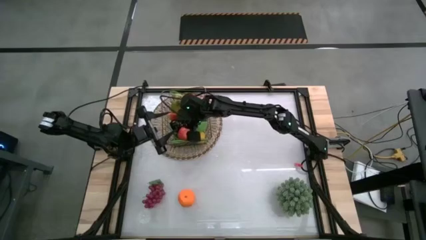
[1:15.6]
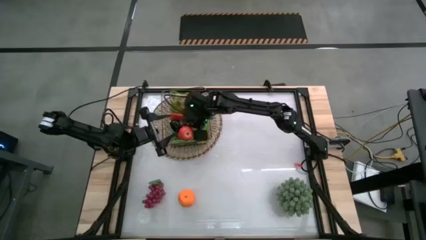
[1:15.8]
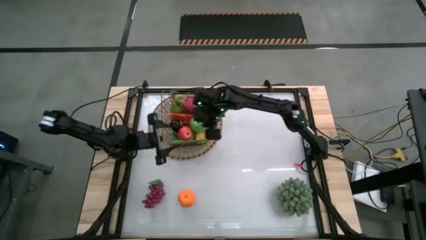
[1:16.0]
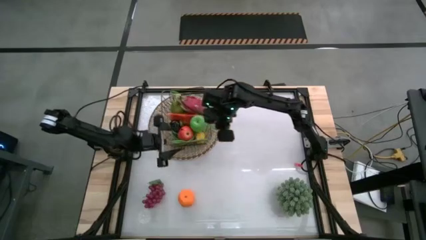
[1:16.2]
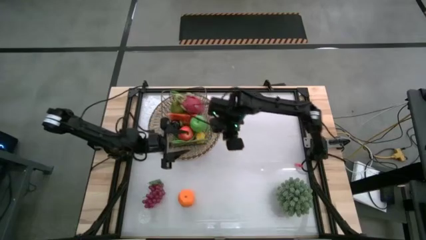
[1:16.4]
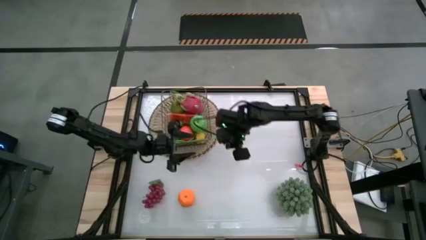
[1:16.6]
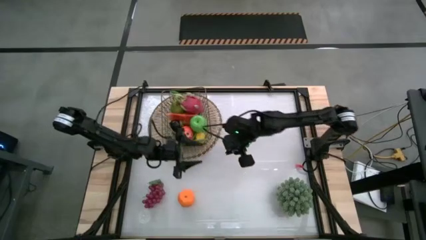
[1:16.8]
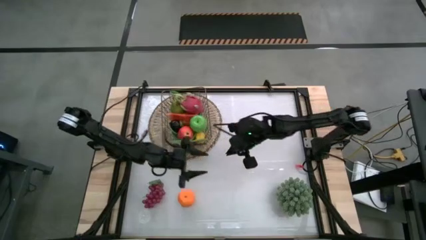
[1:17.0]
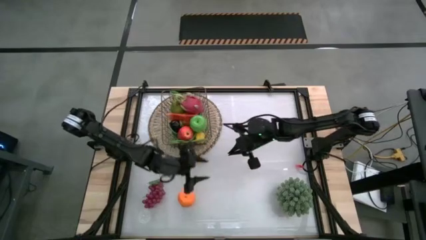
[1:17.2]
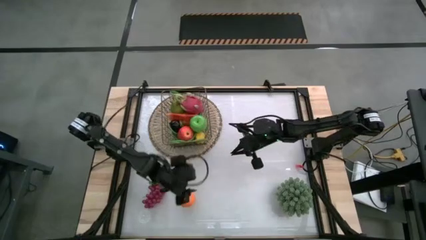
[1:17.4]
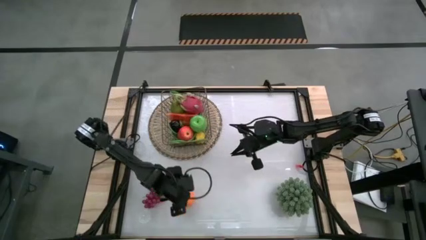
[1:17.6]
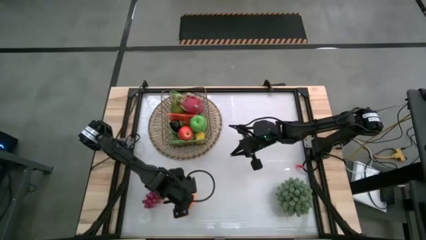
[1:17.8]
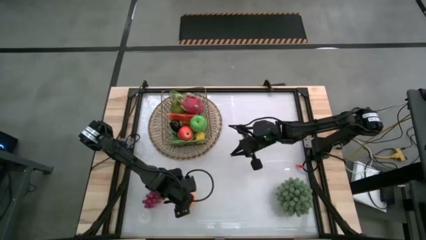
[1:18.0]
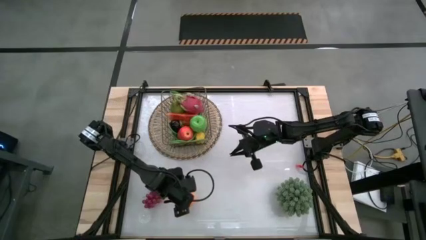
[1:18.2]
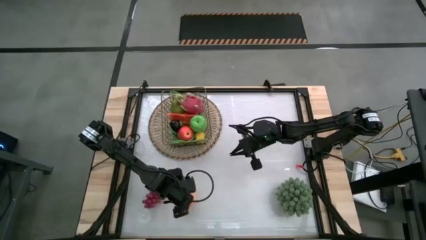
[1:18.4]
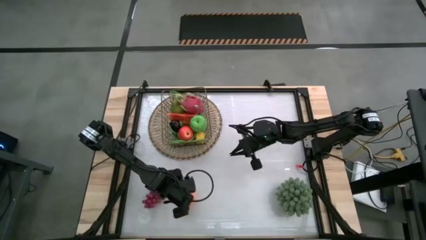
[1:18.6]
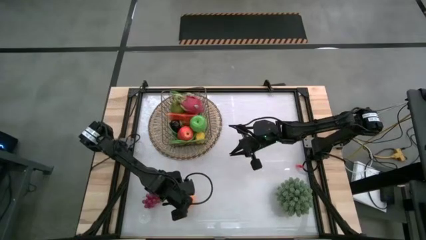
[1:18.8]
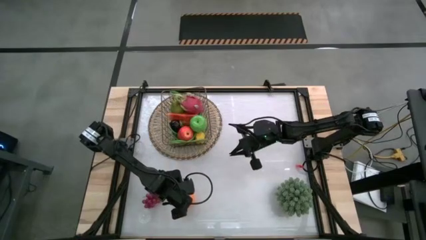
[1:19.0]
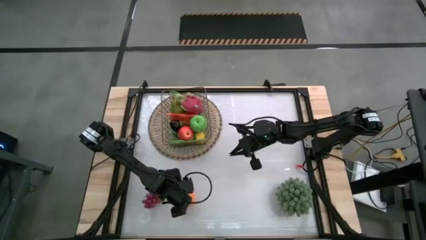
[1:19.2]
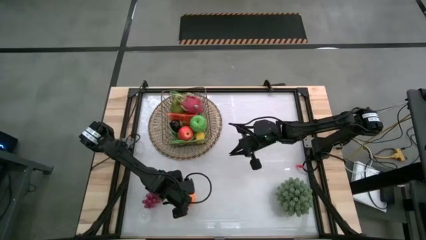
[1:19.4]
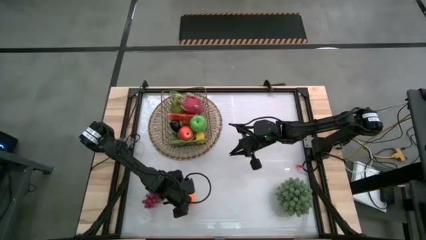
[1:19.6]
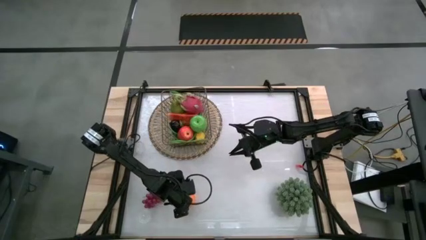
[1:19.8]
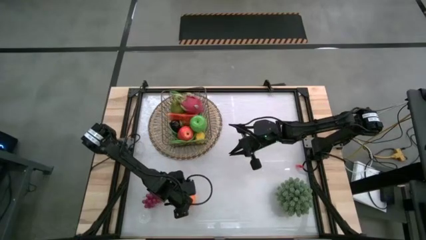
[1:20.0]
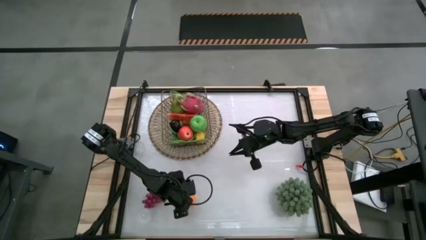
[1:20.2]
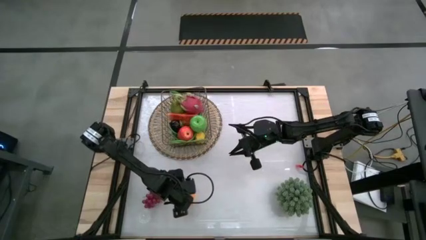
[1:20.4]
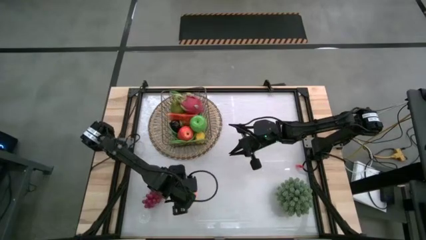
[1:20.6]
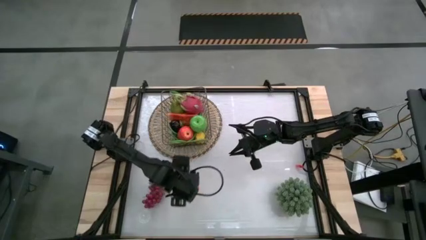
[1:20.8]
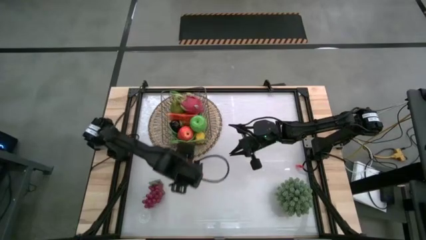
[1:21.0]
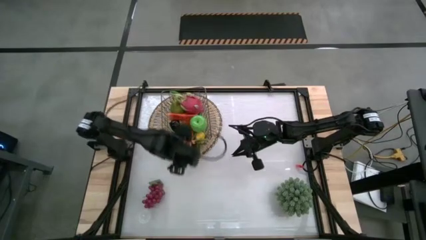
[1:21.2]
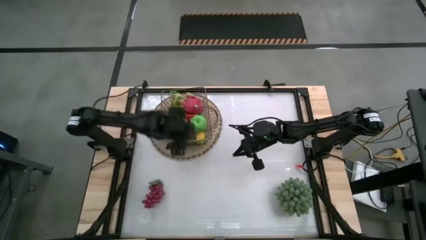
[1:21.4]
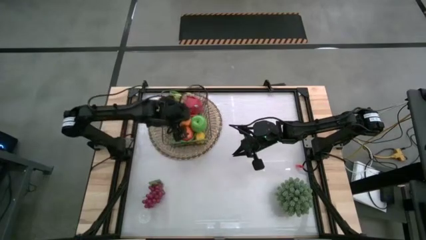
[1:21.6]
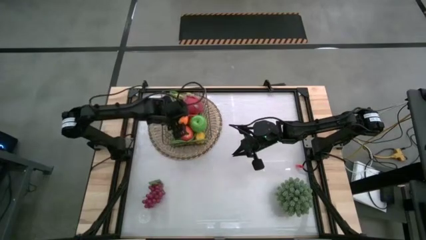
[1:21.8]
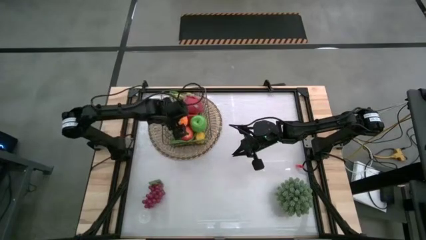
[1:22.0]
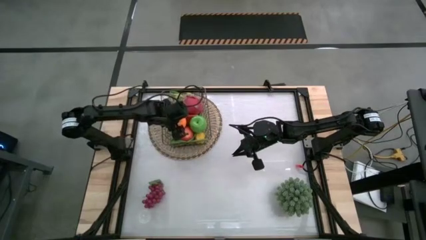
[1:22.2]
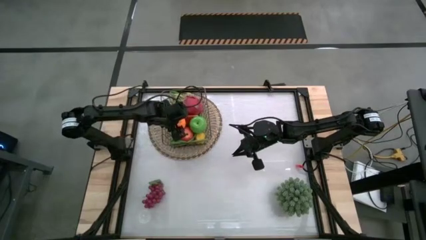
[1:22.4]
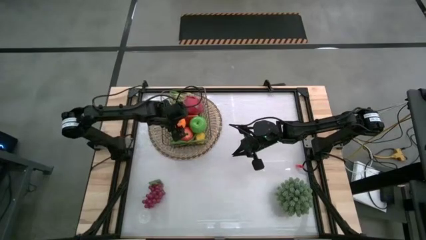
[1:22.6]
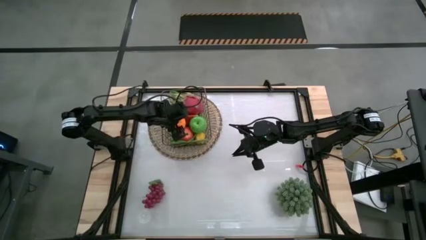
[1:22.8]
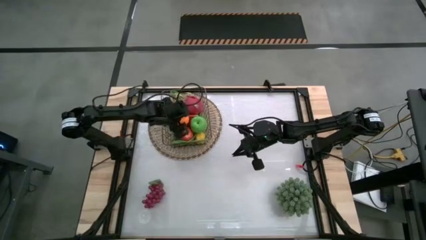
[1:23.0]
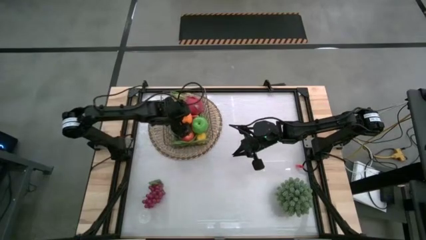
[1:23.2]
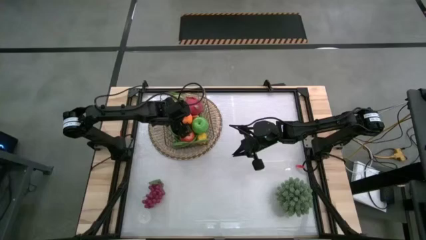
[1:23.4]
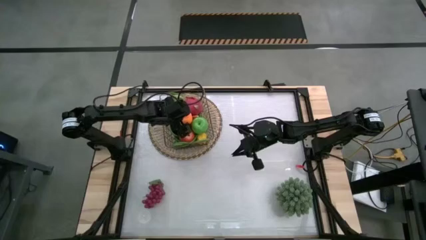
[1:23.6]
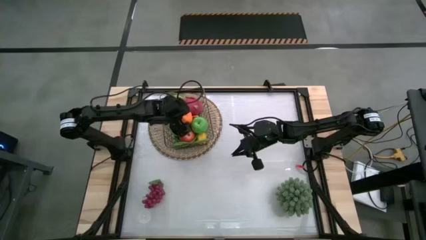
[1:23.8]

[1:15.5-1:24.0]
Task: Build produce basket
Put the orange into the wire basket

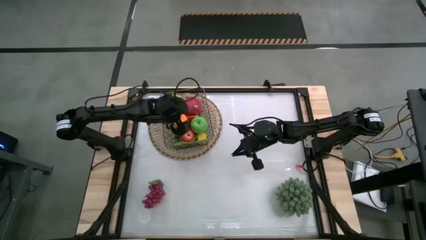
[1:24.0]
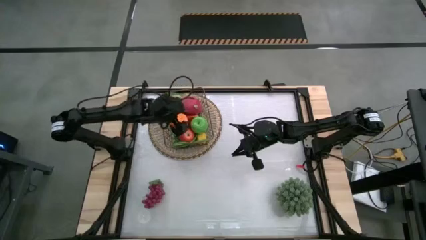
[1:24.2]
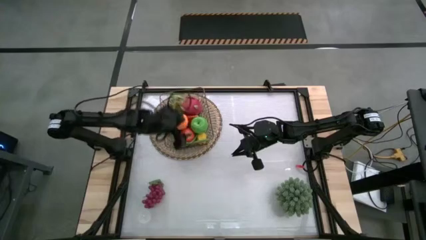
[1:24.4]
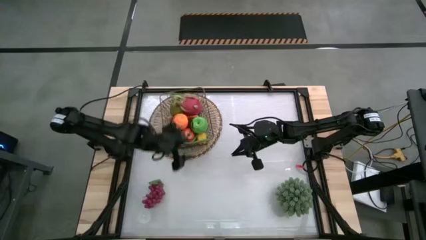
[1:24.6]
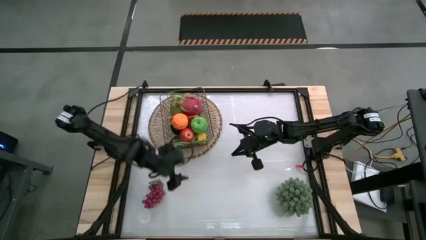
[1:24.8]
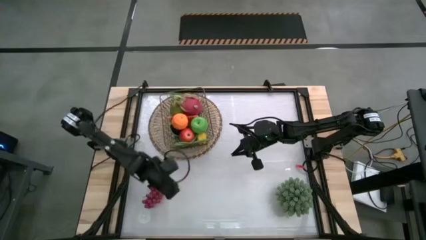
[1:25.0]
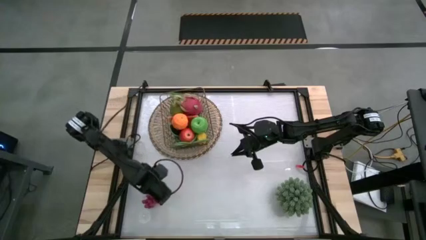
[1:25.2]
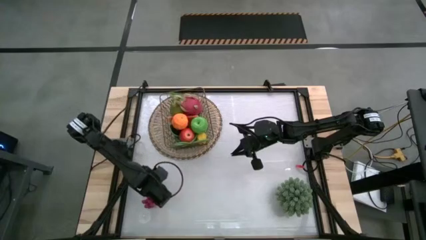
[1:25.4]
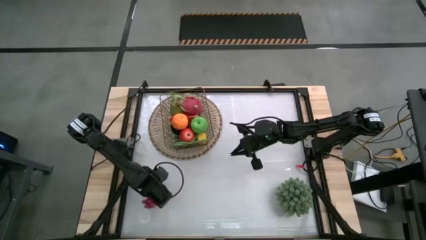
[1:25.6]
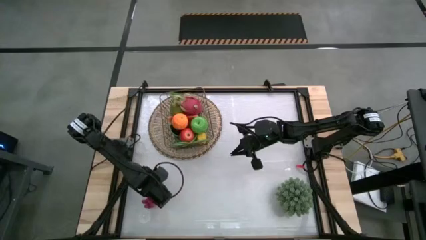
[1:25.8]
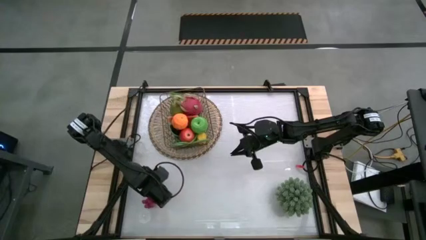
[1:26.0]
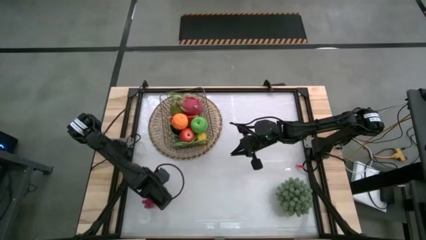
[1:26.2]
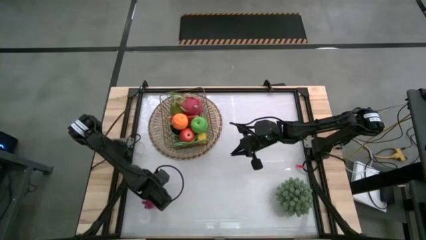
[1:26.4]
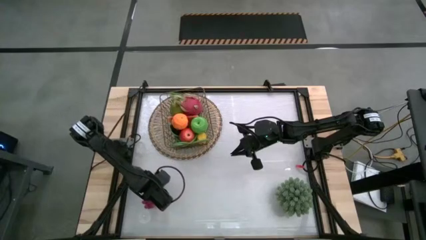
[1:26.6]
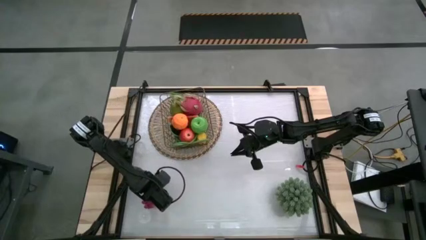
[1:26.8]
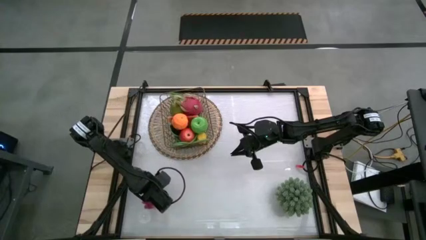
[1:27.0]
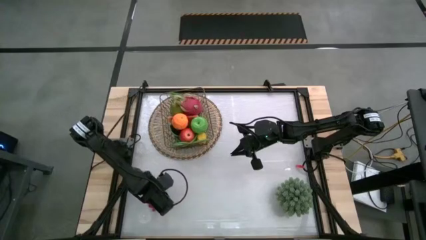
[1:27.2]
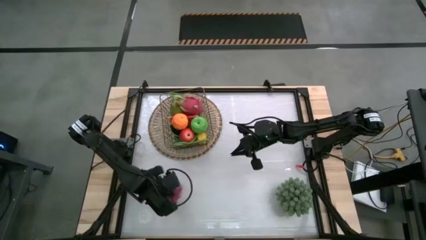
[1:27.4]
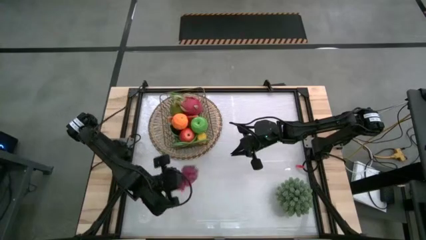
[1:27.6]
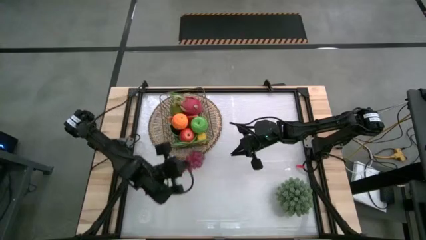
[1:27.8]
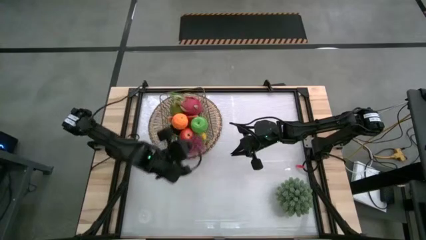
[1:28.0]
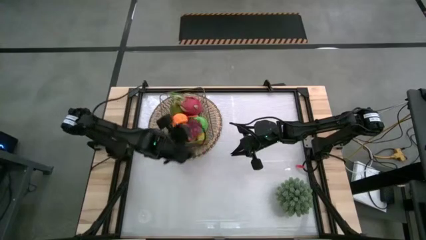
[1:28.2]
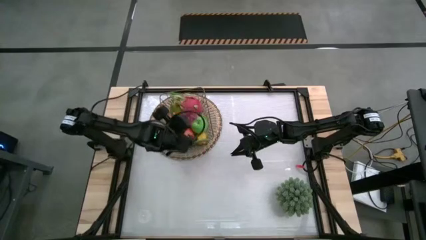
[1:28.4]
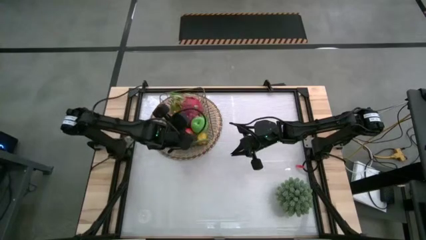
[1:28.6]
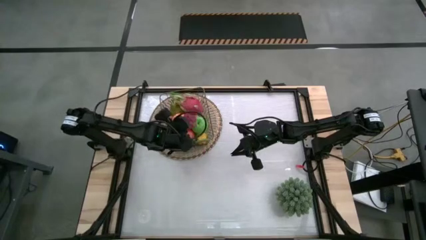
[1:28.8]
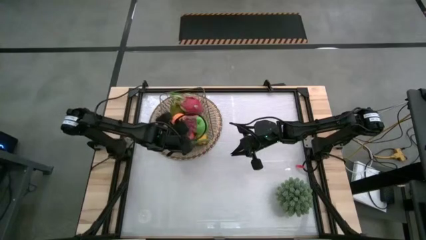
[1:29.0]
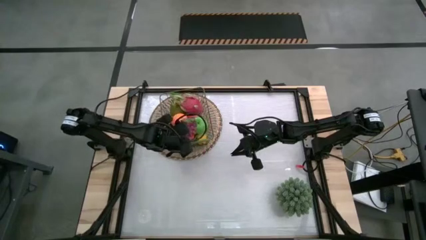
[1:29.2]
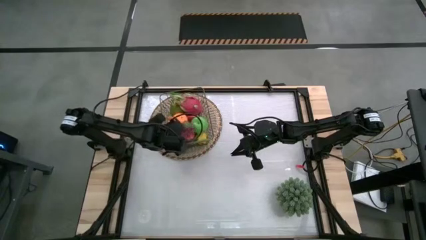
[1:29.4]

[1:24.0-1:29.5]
Put the purple grapes into the wire basket

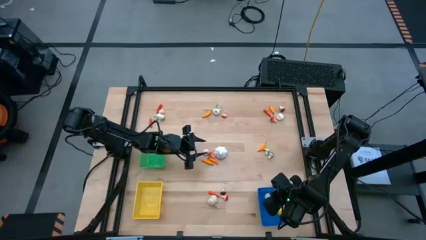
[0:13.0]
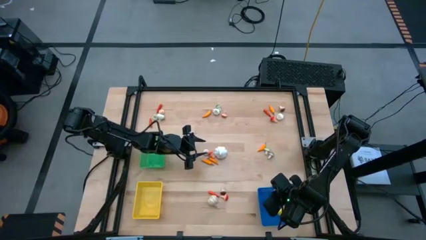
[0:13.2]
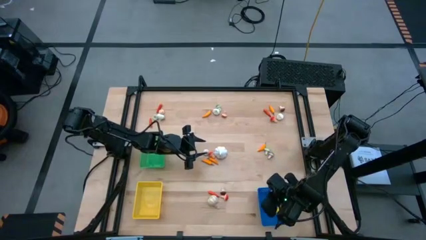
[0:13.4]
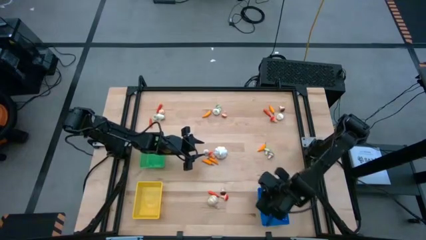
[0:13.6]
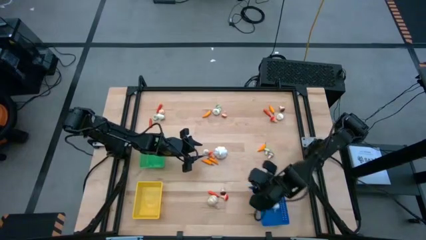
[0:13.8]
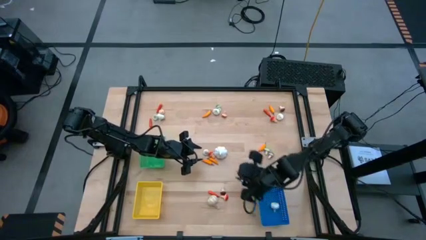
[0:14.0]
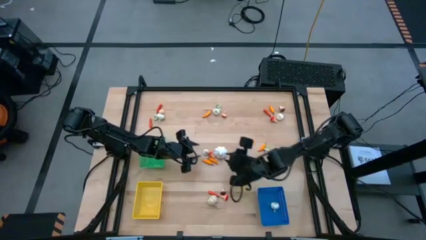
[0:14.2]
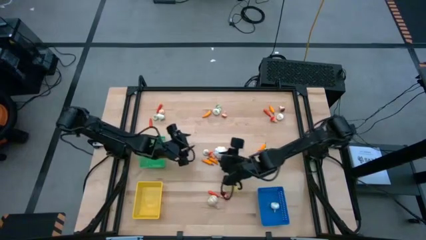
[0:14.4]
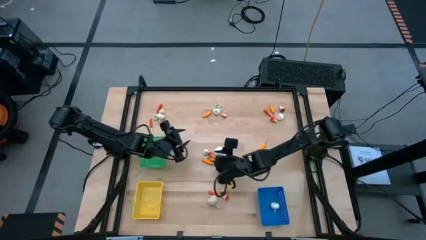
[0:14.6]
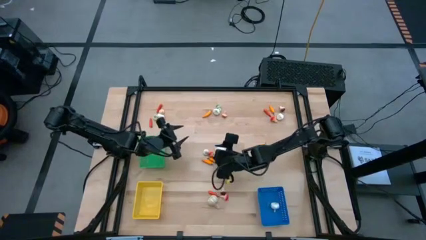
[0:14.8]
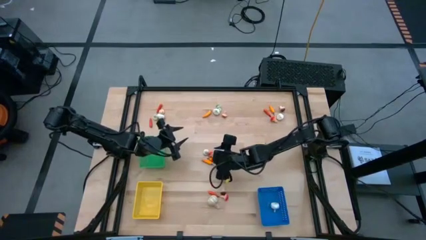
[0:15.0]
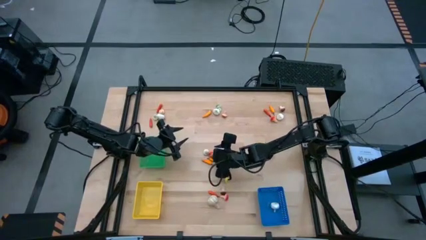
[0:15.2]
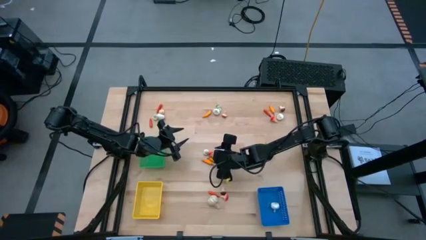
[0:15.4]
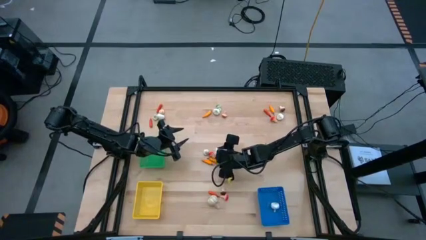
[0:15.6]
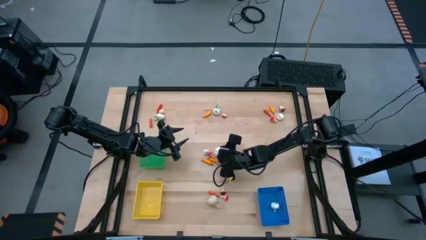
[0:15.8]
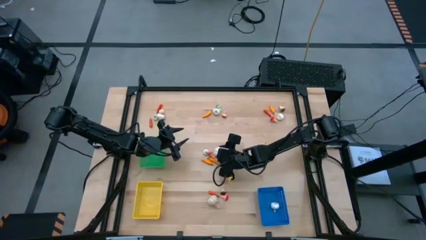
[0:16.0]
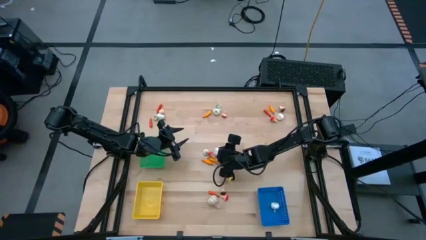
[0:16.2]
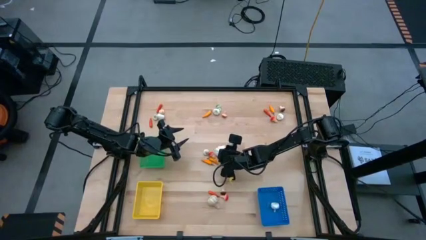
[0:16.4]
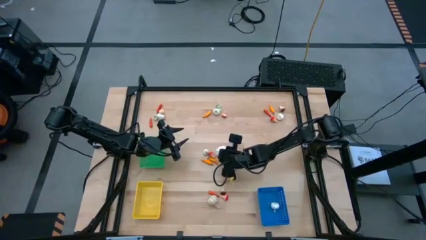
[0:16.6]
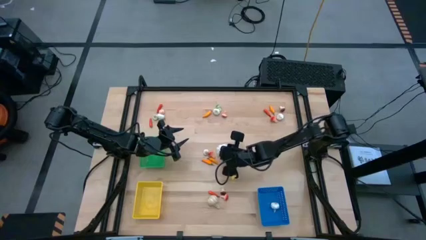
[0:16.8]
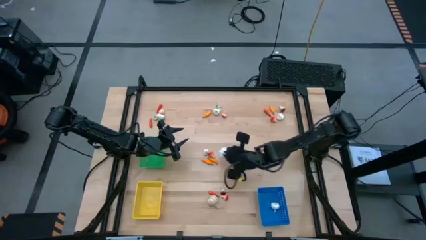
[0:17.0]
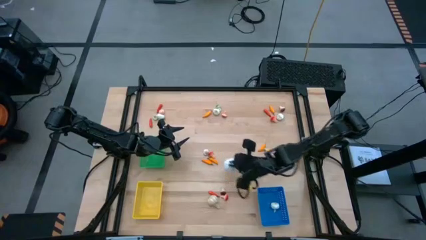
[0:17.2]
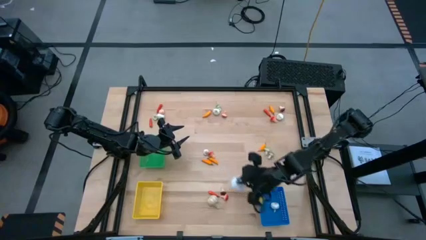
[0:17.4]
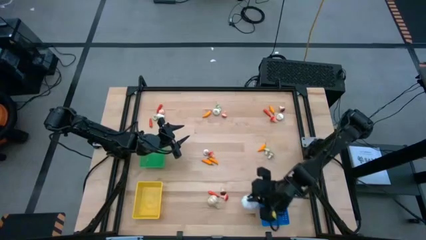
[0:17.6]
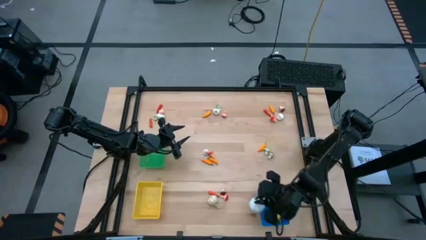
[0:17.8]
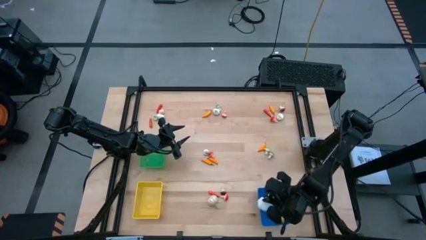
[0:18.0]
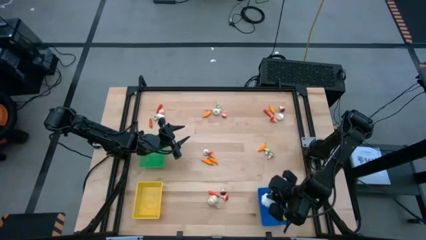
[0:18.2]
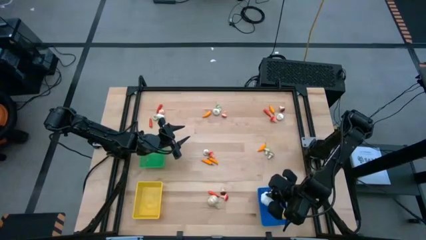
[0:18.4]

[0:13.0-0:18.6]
Task: Sort produce into baskets
Put the garlic into the blue bin
